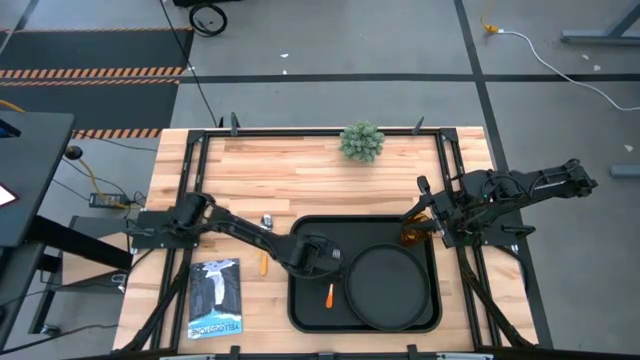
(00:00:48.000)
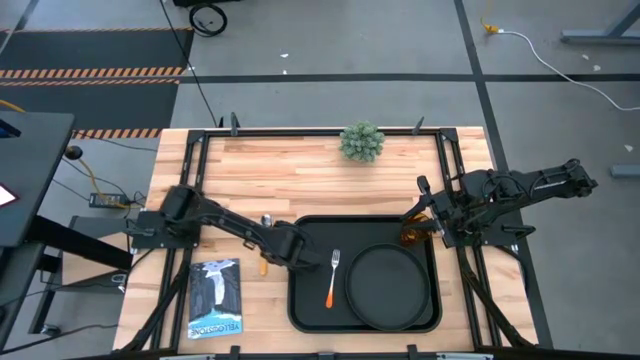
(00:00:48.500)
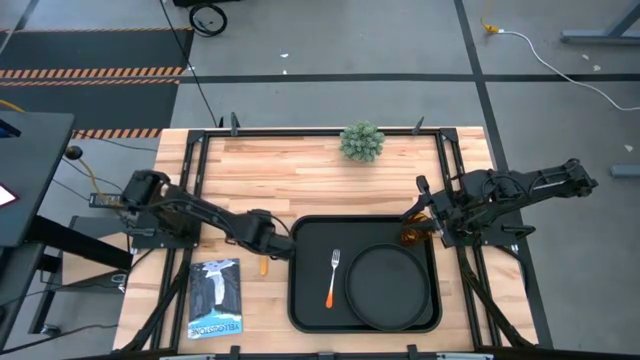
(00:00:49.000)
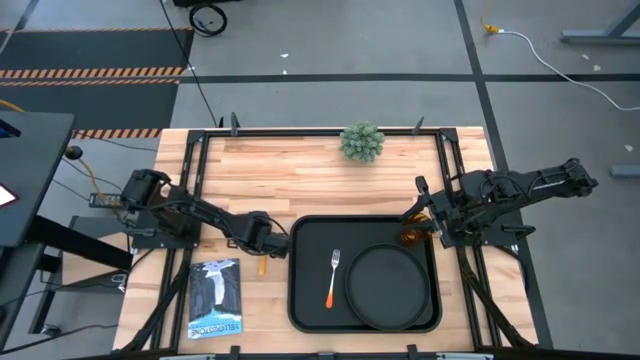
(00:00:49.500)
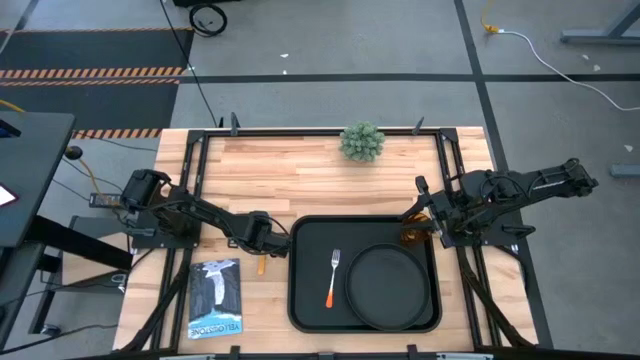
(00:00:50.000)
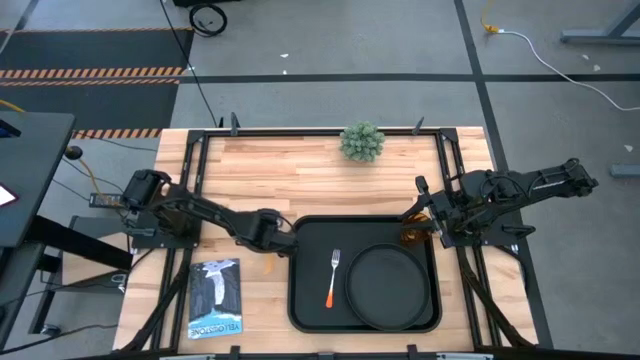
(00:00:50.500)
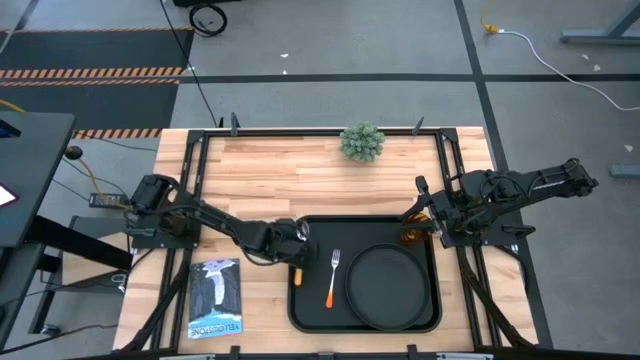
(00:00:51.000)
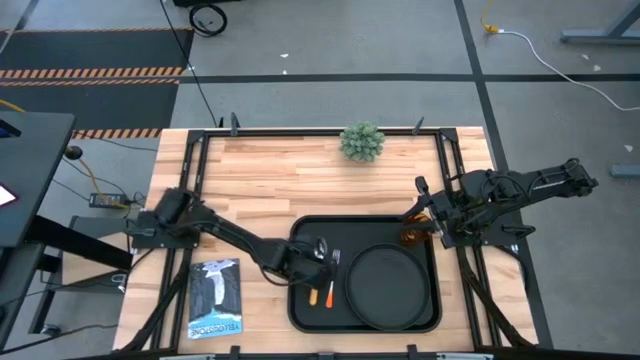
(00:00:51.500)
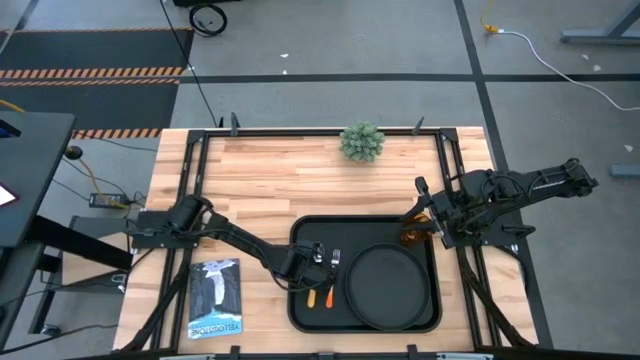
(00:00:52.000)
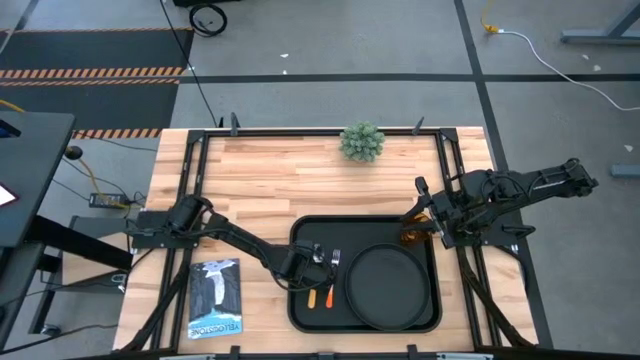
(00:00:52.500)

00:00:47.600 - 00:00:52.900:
Task: Pick and place plate/cup/fork/spoon on tray
Put the yellow spoon on the black tray to the left of the orange fork

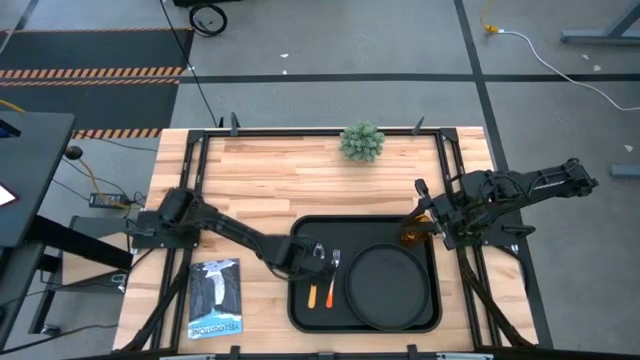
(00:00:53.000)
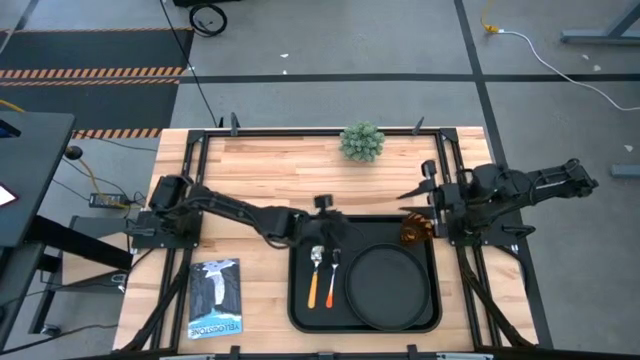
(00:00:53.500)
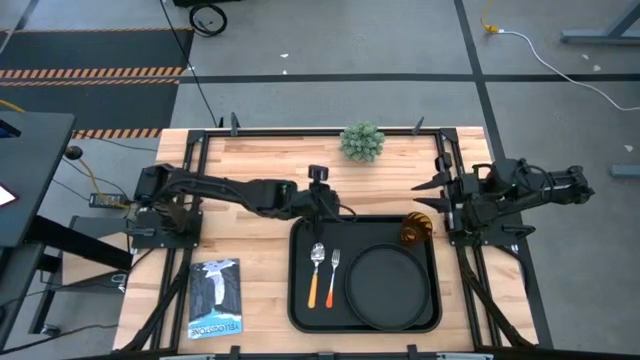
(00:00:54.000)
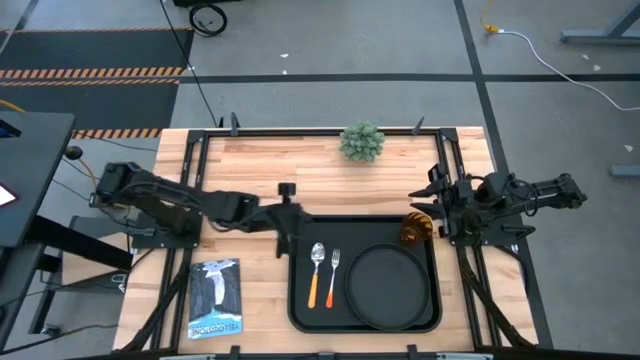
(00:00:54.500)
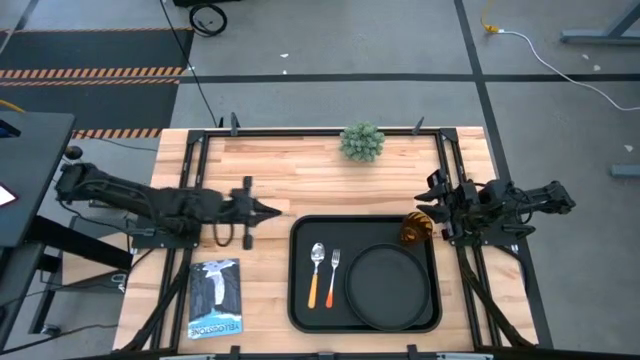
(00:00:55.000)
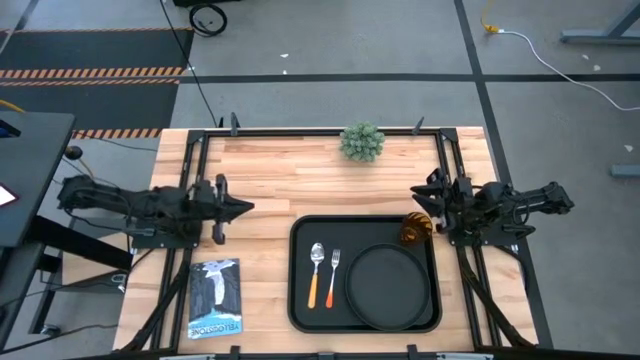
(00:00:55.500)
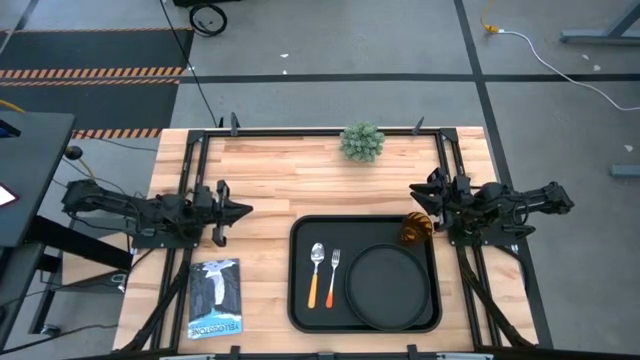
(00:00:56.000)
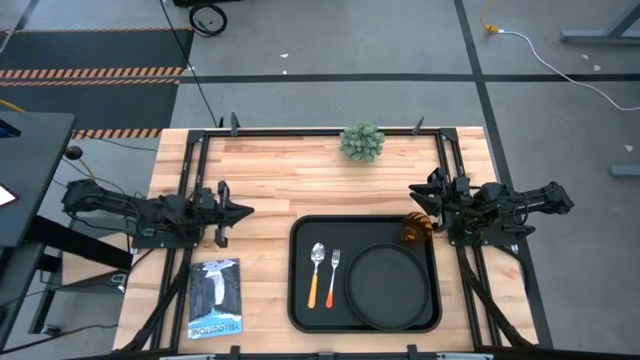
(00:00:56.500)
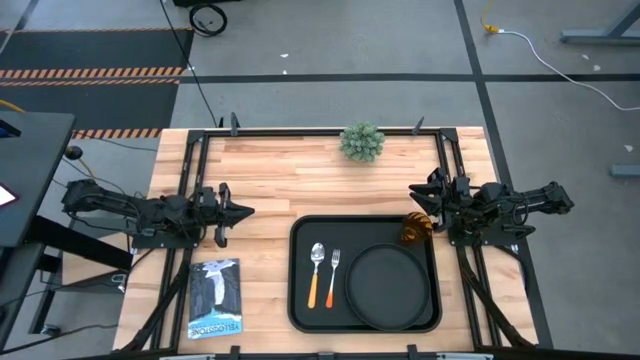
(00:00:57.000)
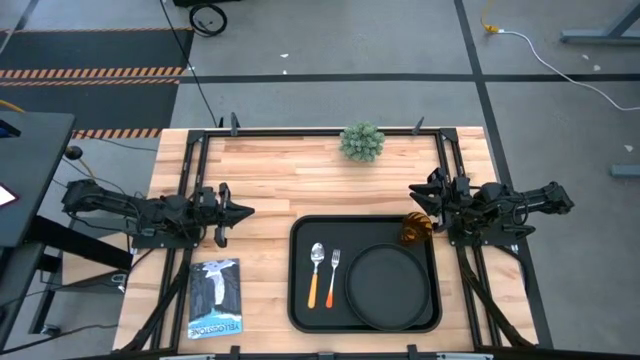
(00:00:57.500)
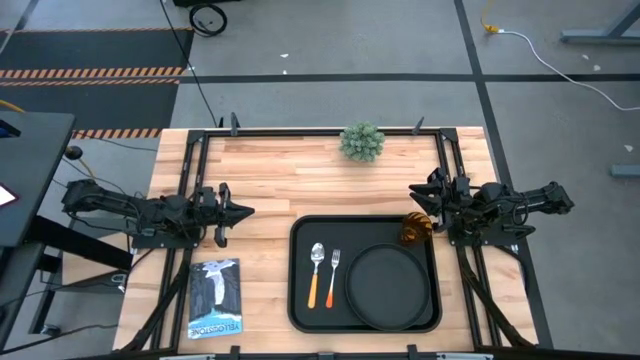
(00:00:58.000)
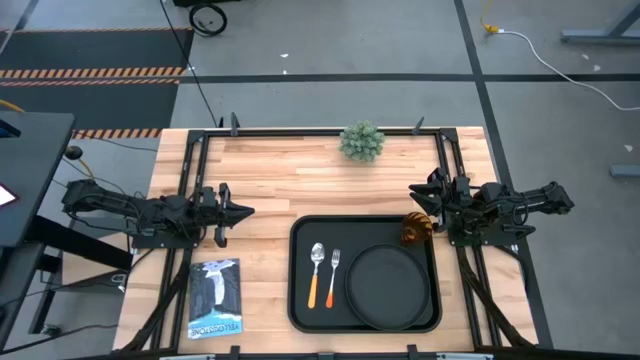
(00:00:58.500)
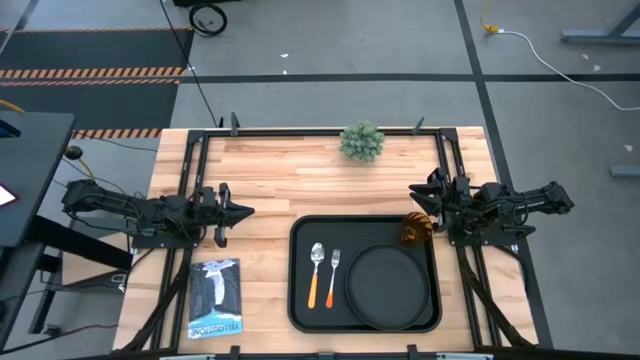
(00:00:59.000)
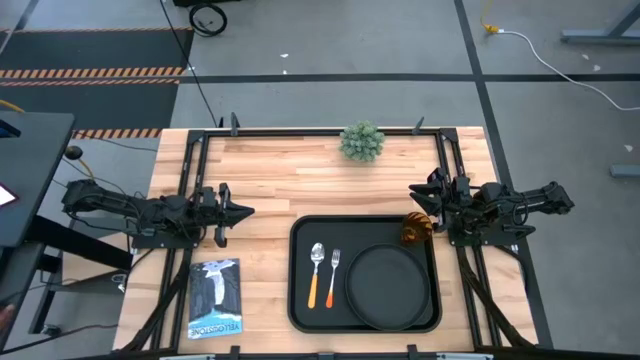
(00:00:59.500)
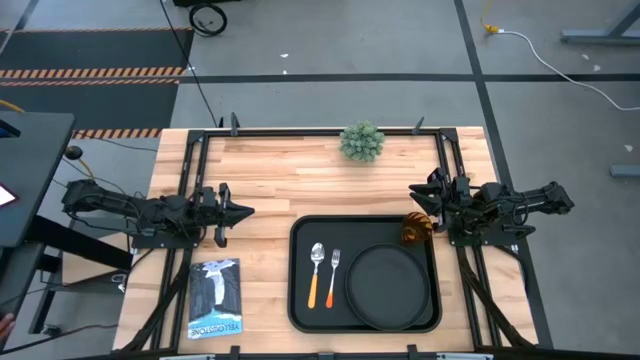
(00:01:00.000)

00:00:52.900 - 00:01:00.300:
Return to Home Position

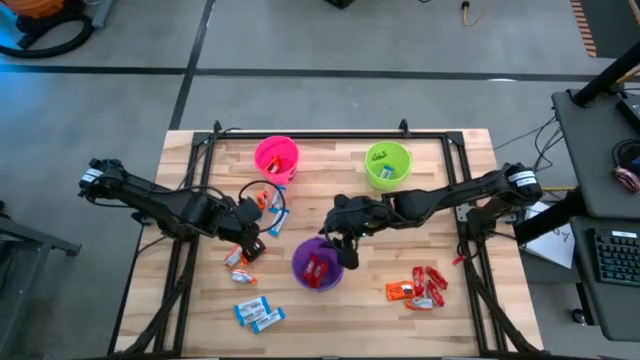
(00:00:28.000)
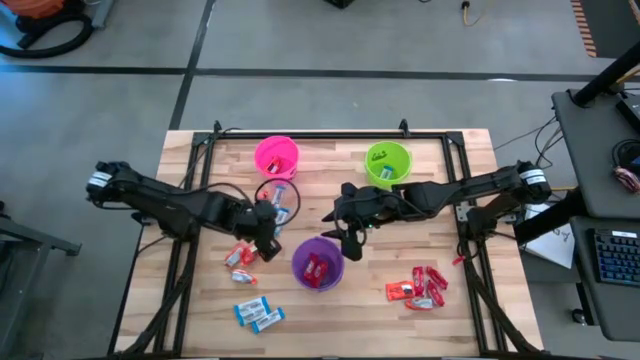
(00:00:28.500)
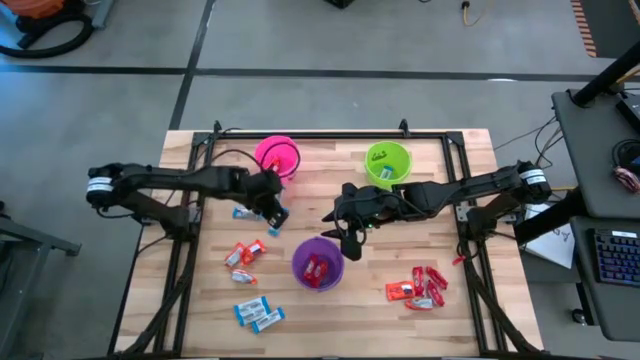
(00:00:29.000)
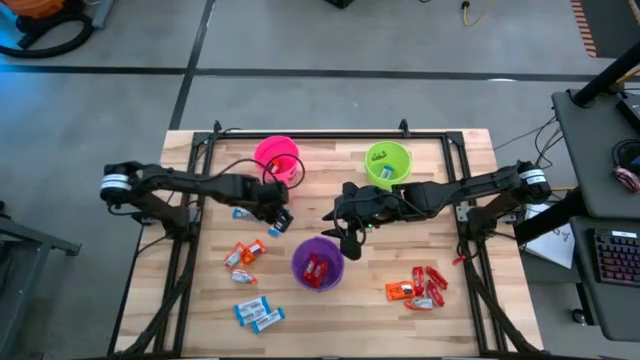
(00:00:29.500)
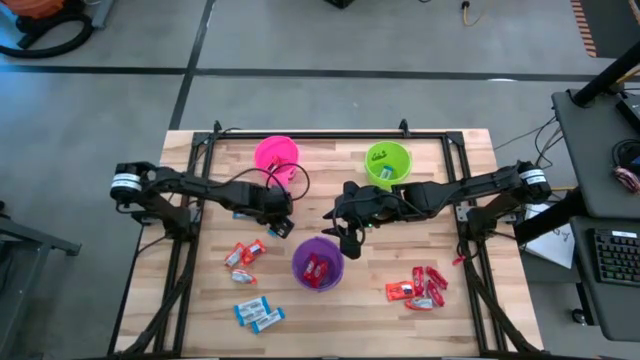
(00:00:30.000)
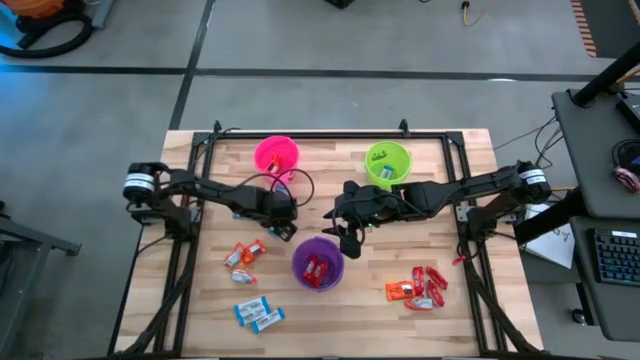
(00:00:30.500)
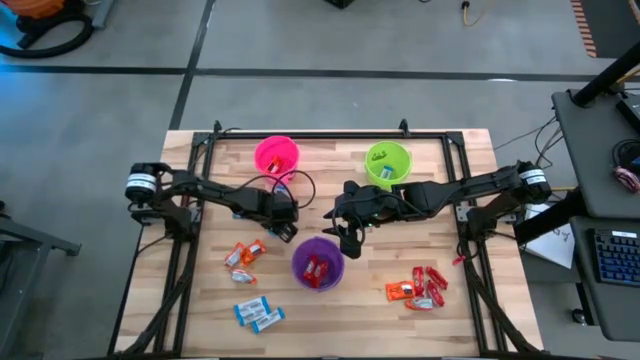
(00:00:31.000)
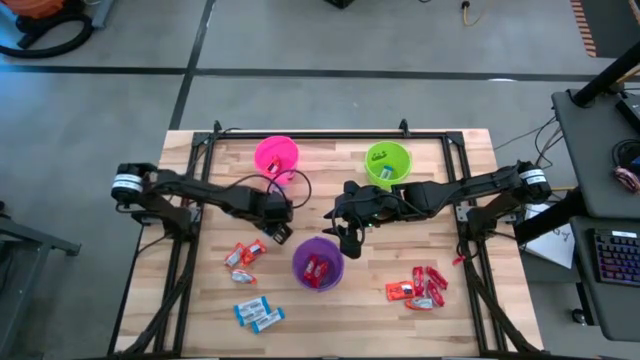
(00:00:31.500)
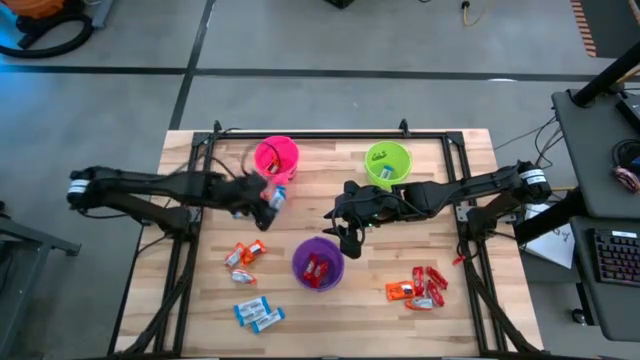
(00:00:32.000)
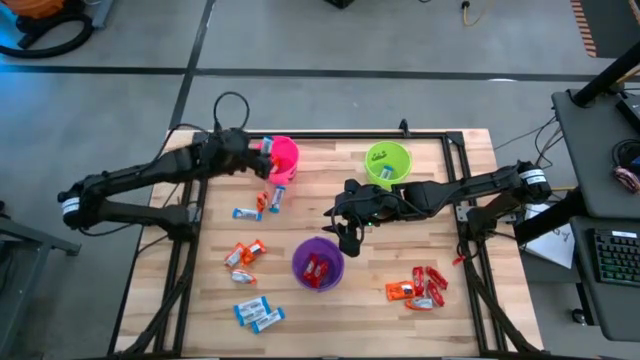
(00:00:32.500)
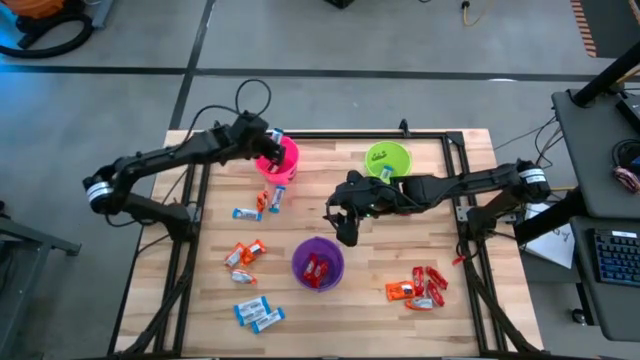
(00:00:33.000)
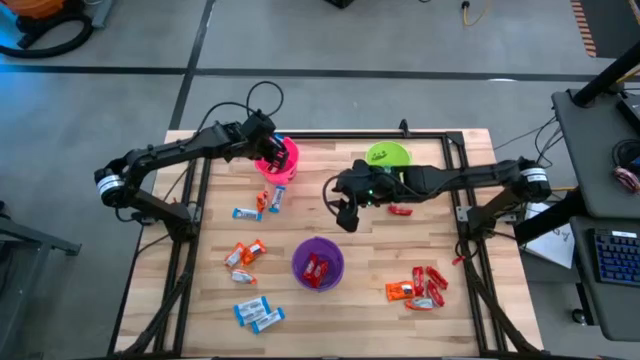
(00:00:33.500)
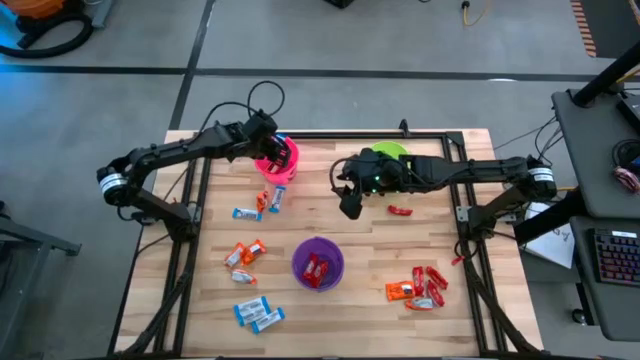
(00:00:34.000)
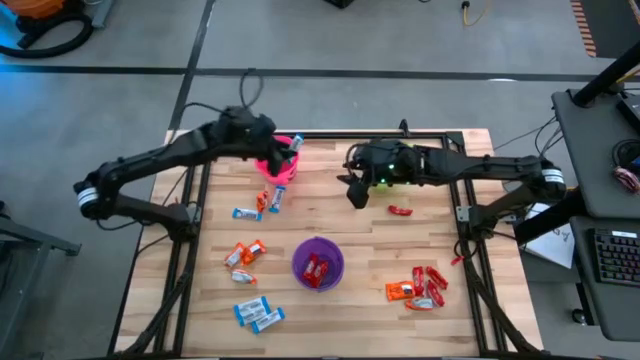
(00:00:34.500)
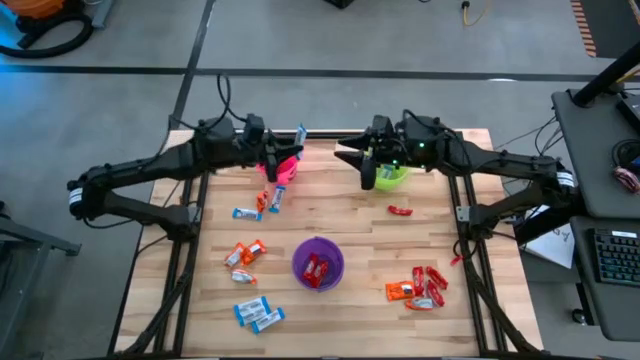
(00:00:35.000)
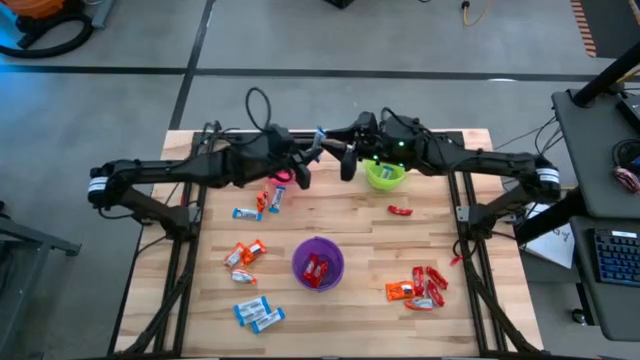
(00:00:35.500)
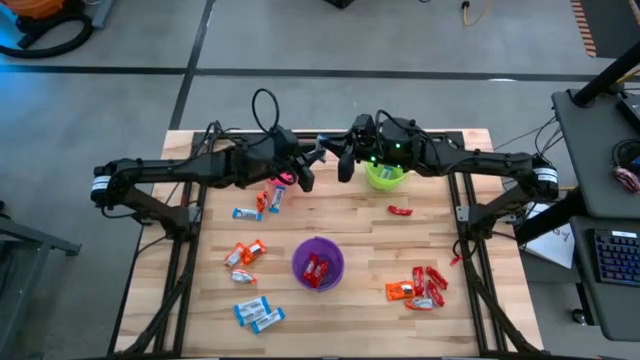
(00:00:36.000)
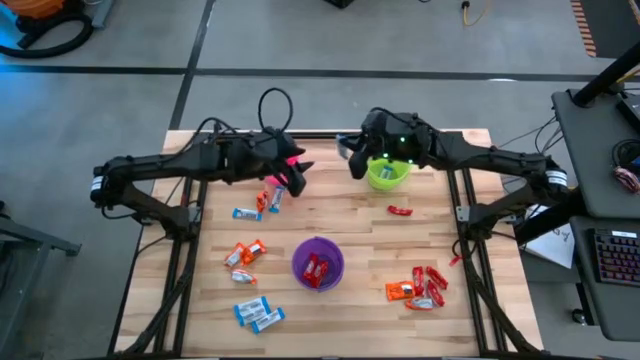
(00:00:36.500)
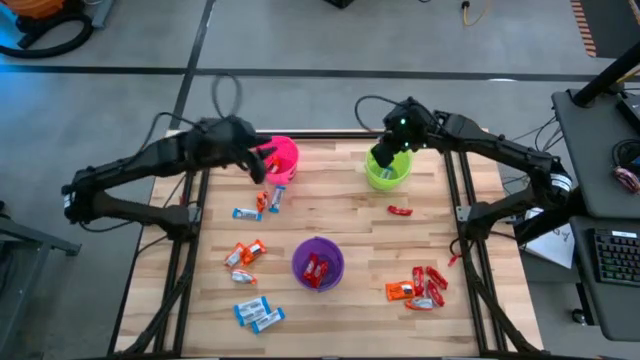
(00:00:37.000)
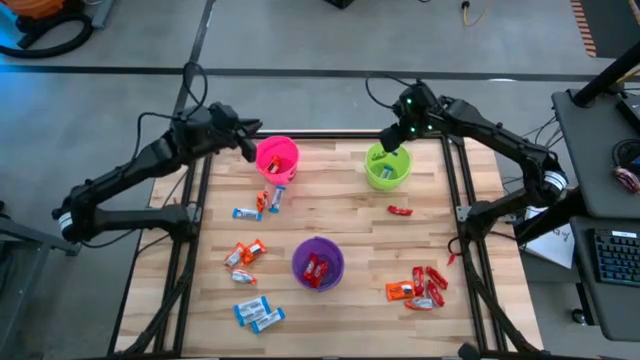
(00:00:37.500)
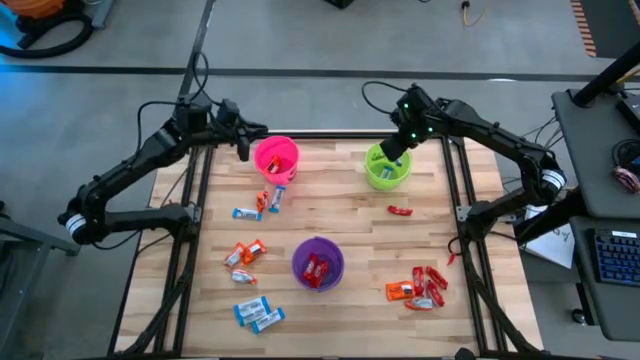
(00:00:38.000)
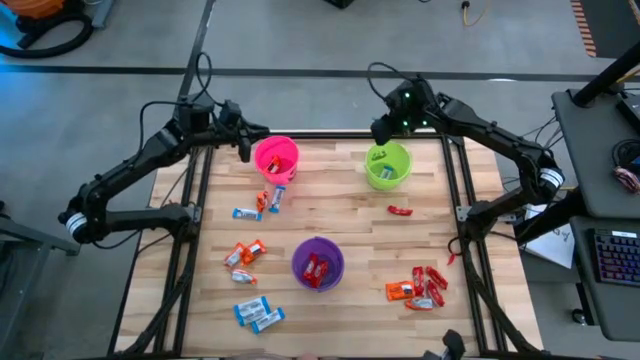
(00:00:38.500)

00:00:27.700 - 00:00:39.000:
Task: Sort candy
Put the white-blue chocolate into the green bucket
